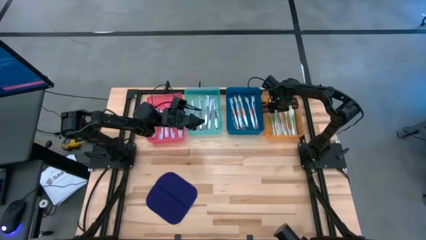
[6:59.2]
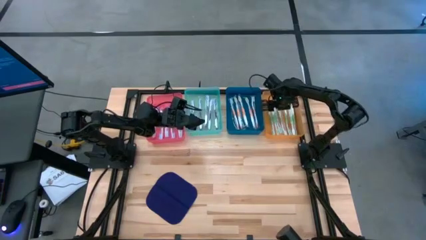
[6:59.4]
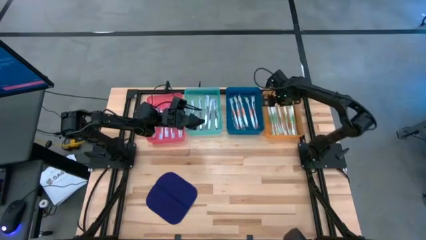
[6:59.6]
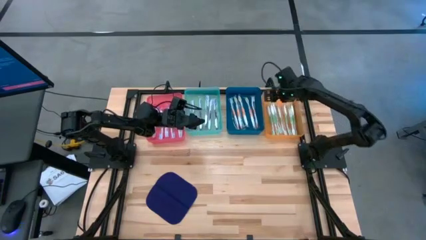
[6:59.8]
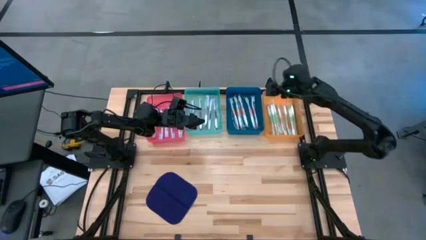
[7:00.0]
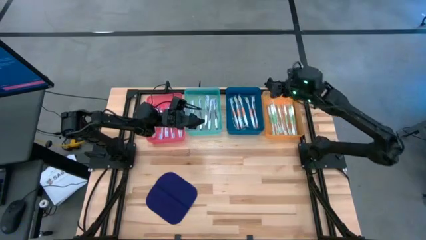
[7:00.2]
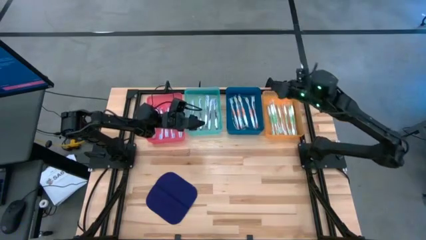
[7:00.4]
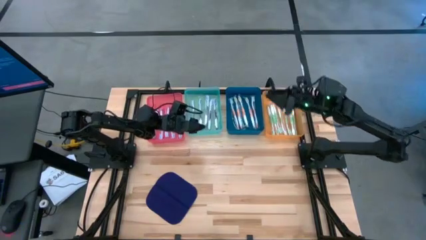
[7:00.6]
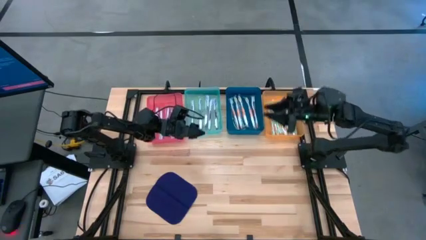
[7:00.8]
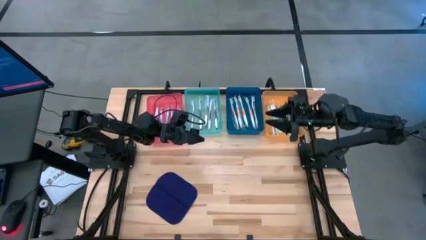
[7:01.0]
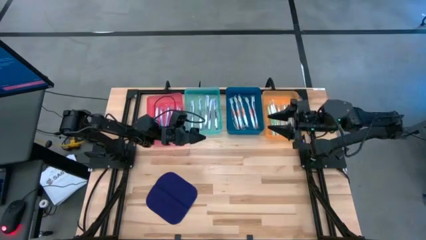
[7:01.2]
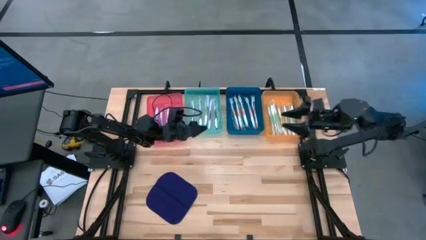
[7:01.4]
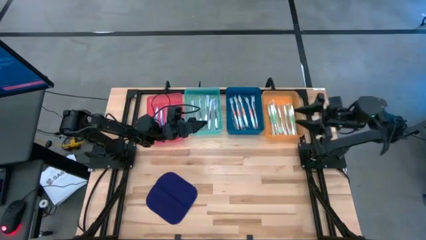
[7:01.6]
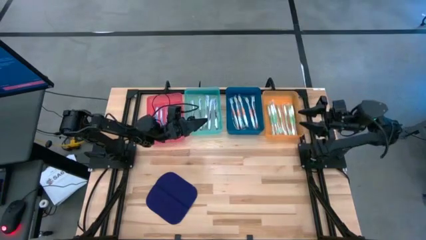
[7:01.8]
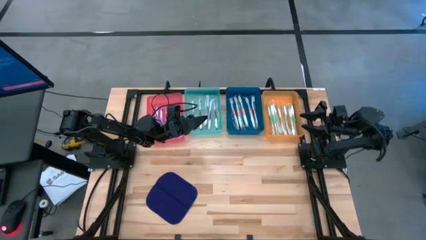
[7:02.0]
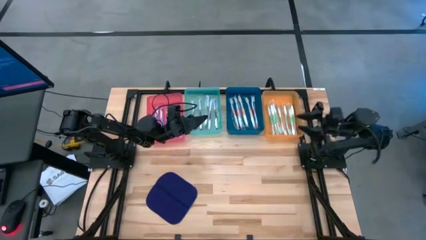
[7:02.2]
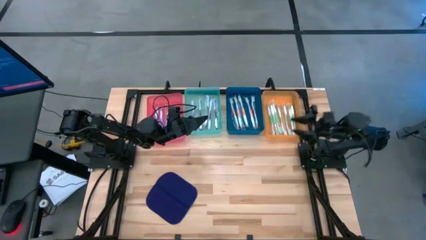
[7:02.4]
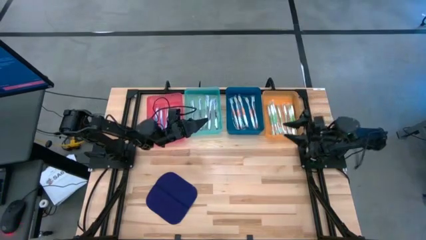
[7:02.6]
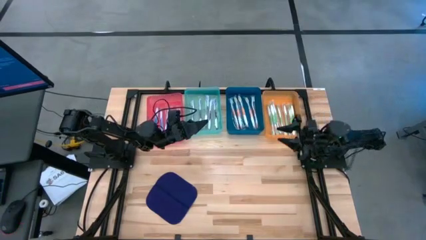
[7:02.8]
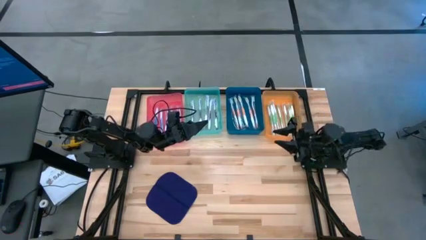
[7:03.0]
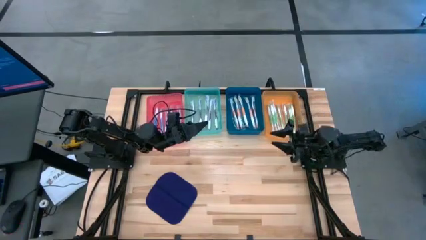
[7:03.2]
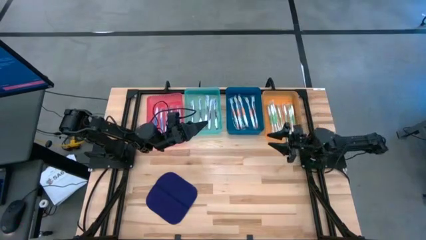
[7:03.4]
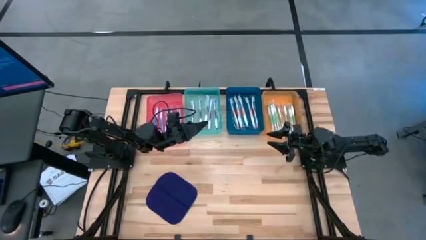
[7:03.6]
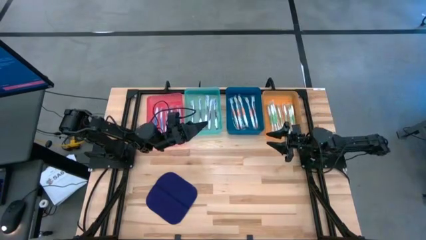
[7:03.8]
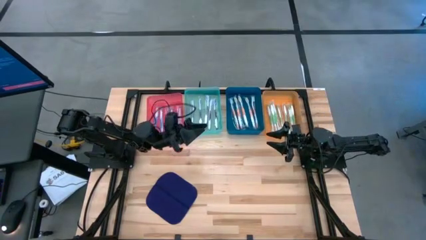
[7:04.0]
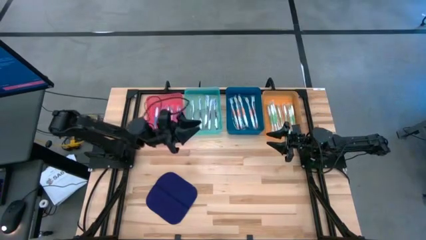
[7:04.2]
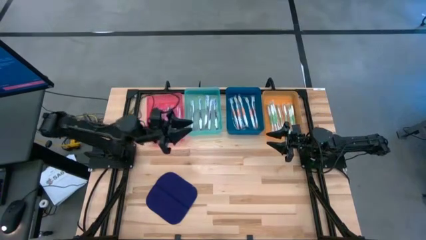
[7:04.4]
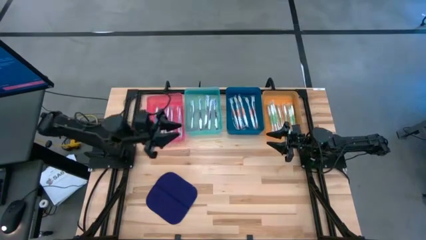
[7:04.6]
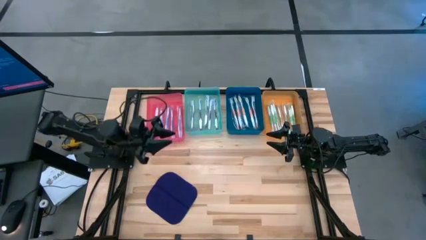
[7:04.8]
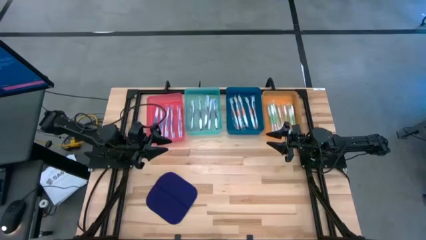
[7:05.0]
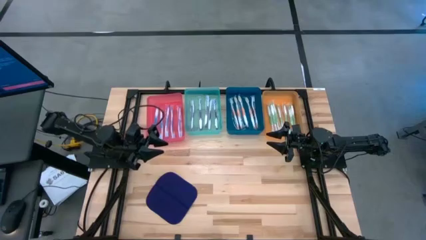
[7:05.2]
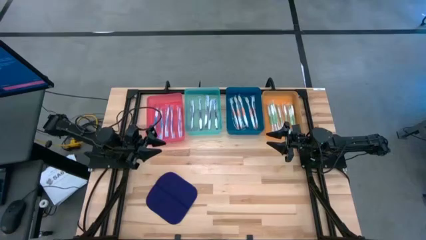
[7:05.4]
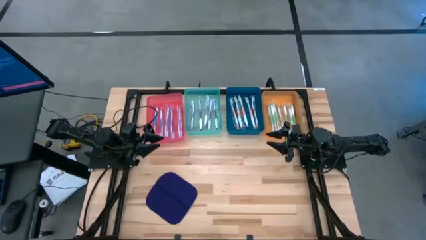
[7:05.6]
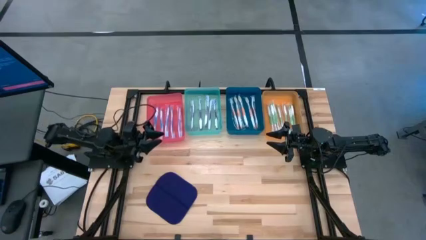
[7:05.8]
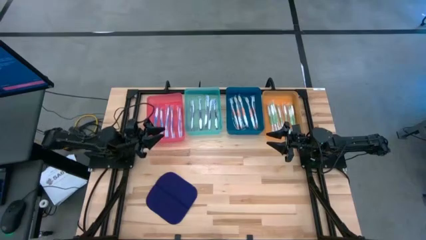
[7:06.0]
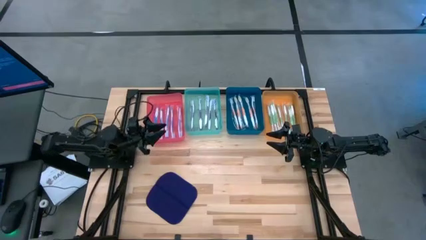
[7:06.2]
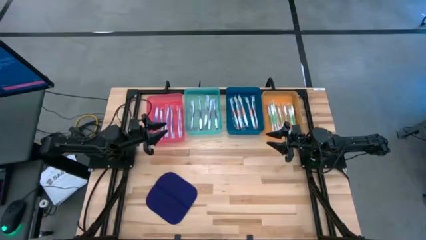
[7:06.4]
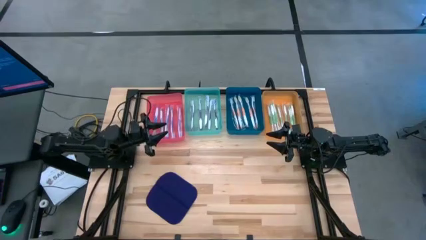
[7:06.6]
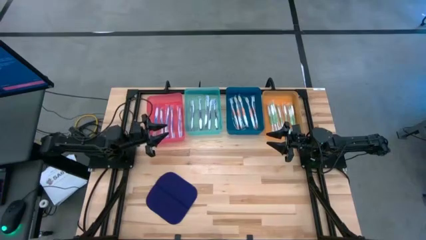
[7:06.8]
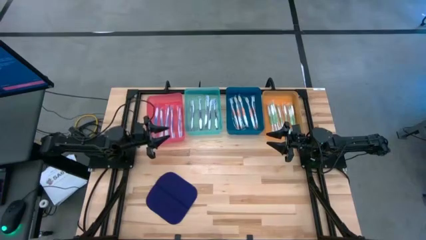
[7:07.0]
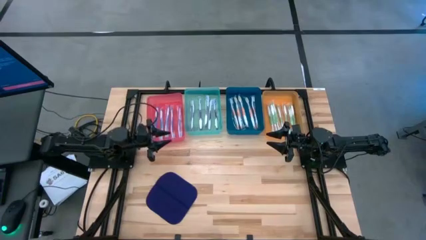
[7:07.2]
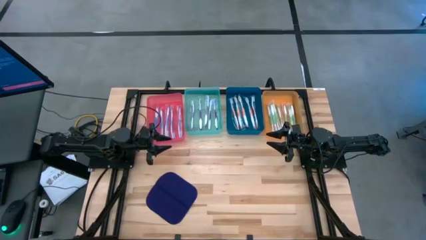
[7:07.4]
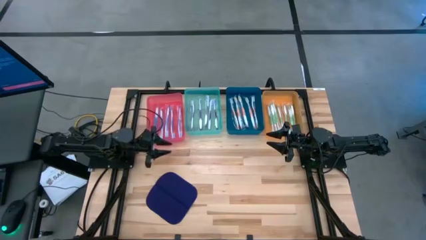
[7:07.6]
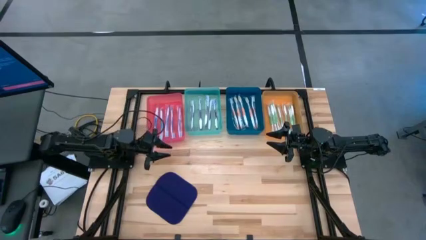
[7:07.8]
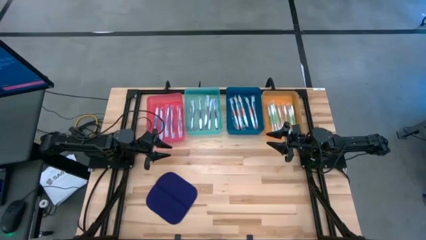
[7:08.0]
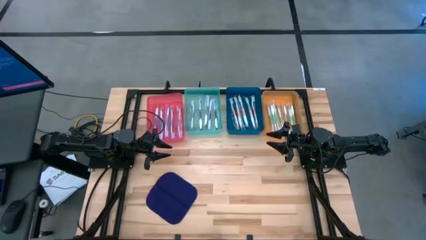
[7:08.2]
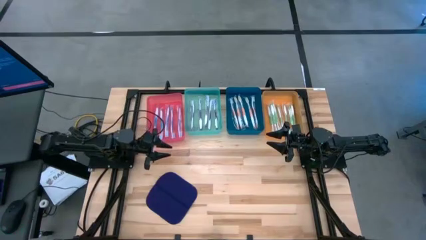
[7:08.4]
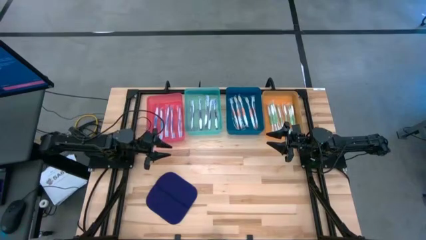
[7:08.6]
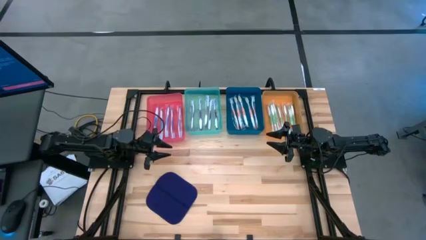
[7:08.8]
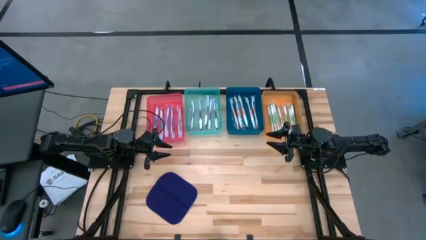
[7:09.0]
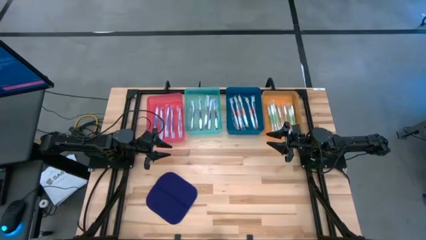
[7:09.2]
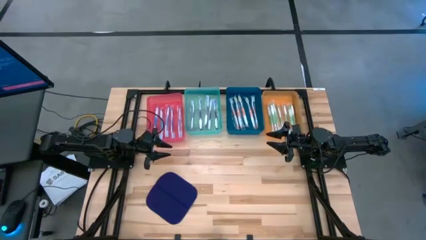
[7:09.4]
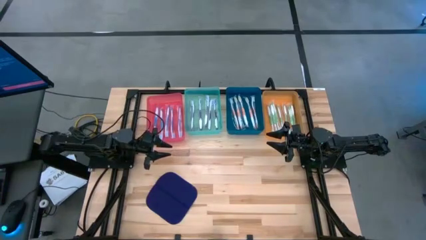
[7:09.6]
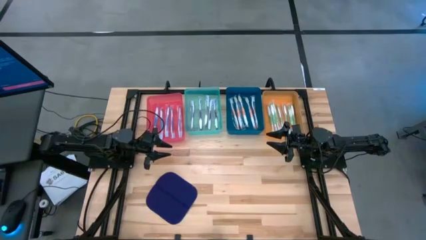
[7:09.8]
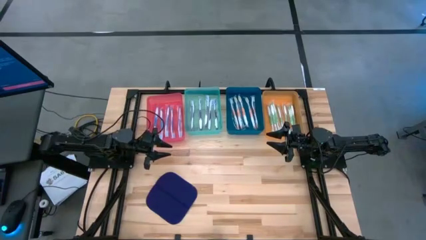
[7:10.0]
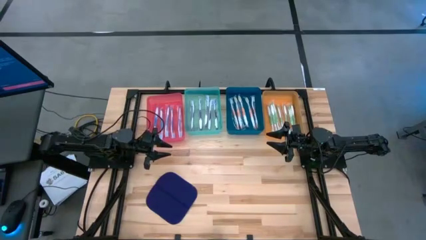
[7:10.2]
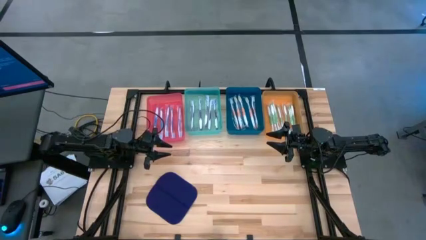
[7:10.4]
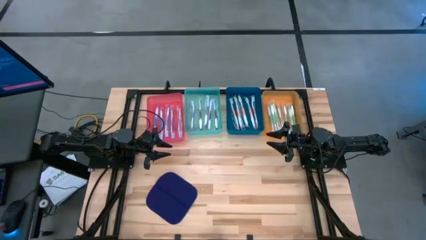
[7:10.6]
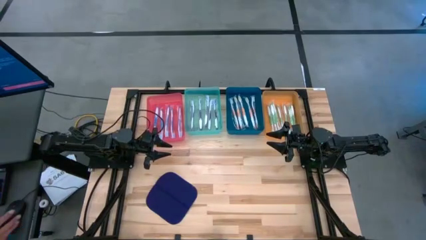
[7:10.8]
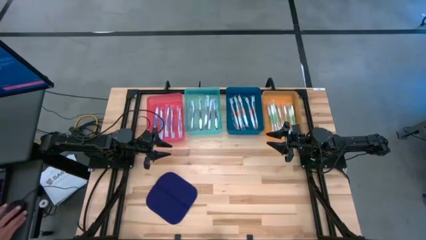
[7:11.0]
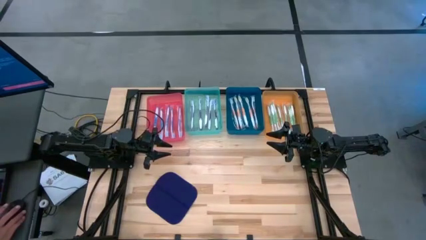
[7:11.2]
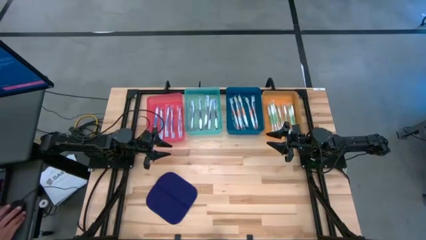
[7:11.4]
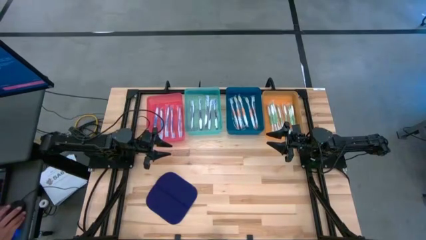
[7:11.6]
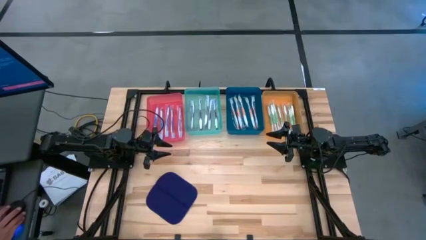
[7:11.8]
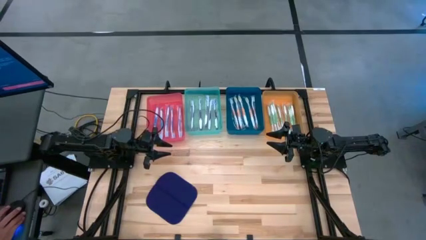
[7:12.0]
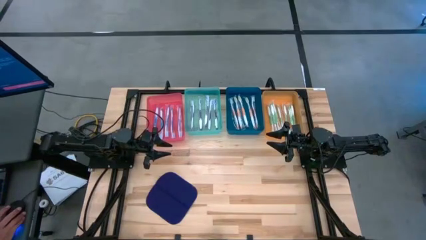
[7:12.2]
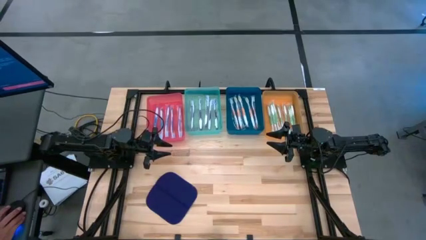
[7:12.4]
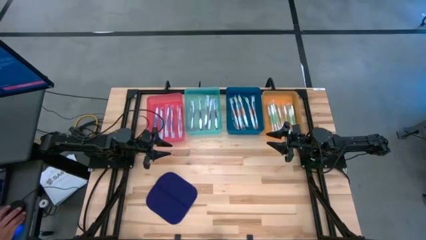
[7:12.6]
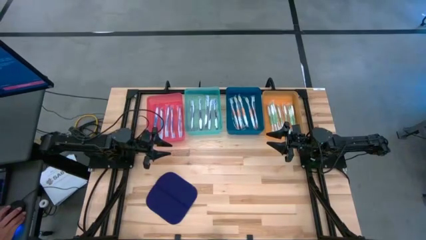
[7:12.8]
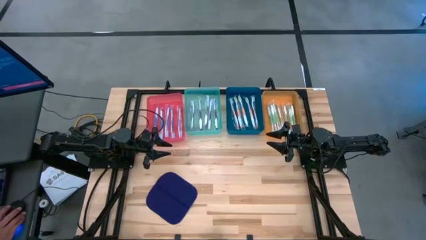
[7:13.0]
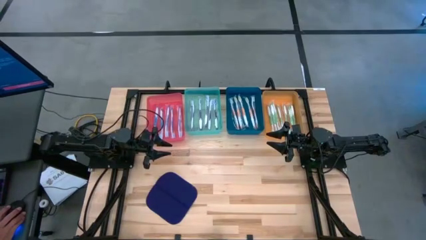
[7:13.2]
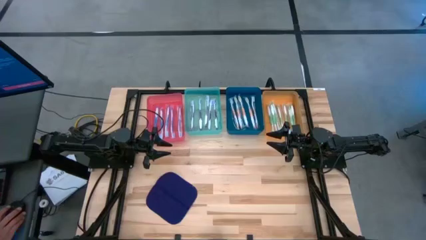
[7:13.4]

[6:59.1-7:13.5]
Task: Pick & Place Toothbrushes
Return to Home Position

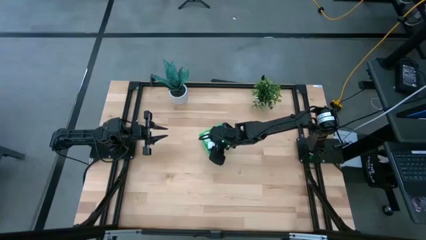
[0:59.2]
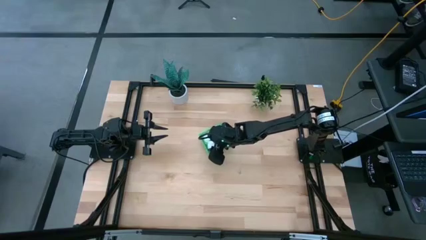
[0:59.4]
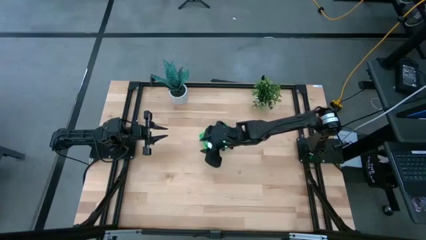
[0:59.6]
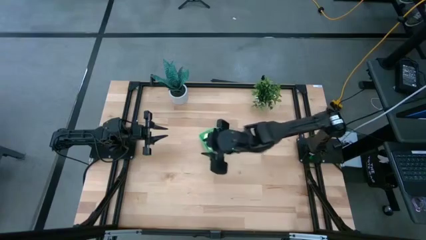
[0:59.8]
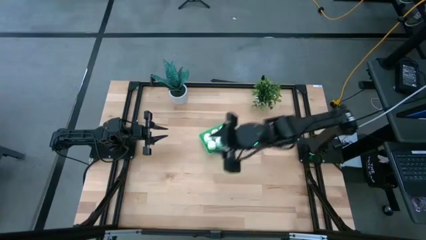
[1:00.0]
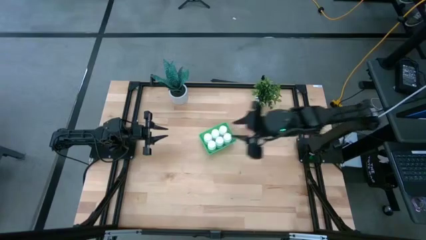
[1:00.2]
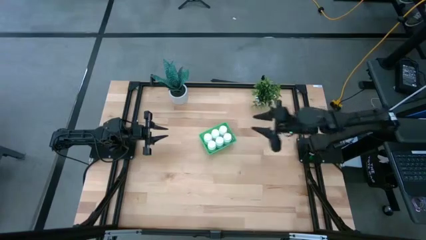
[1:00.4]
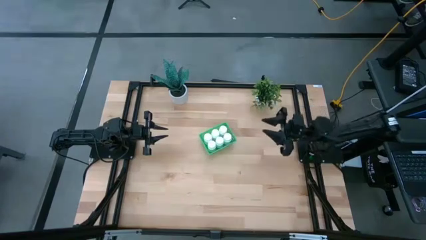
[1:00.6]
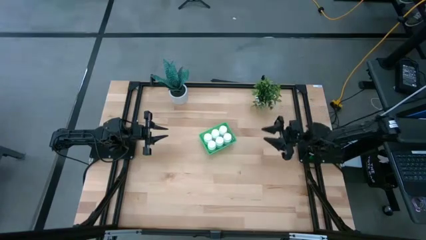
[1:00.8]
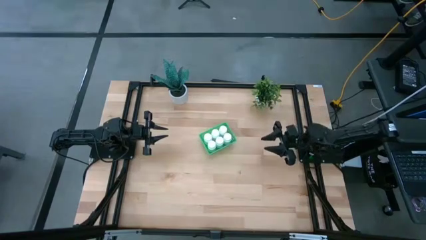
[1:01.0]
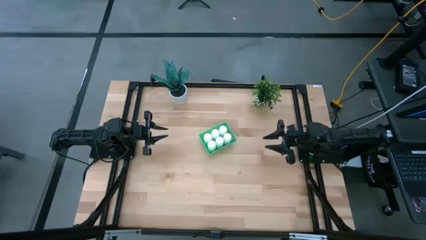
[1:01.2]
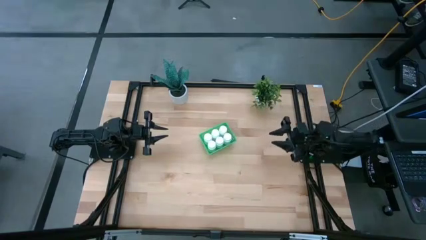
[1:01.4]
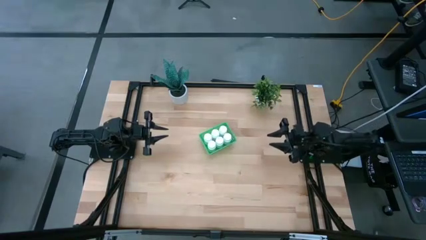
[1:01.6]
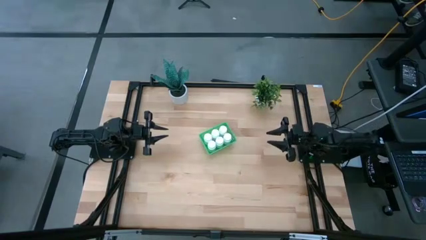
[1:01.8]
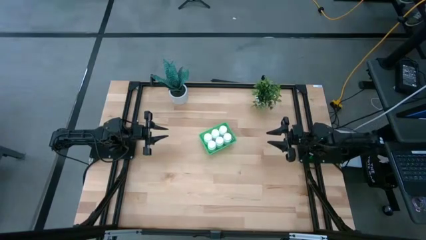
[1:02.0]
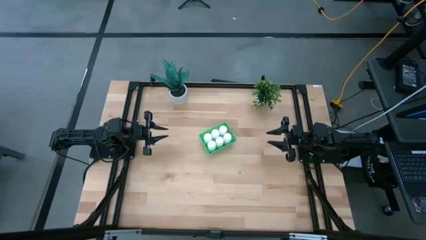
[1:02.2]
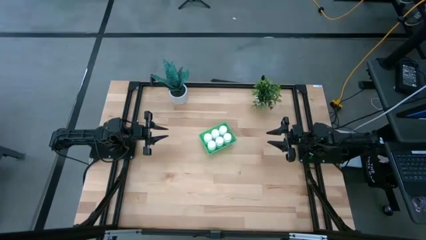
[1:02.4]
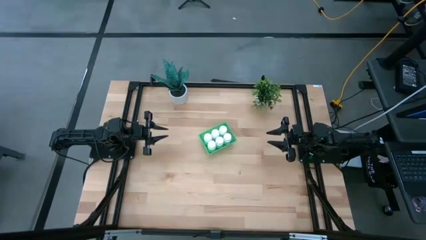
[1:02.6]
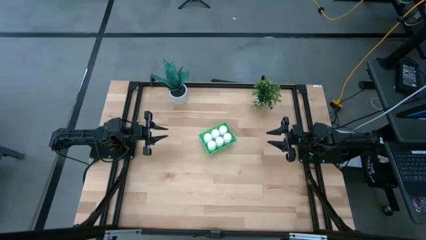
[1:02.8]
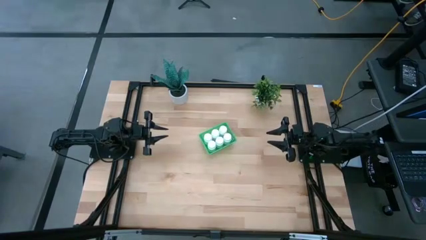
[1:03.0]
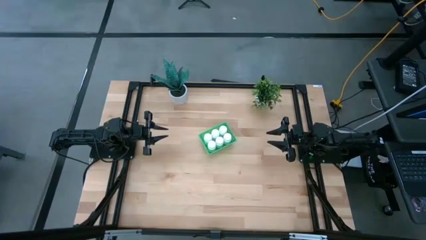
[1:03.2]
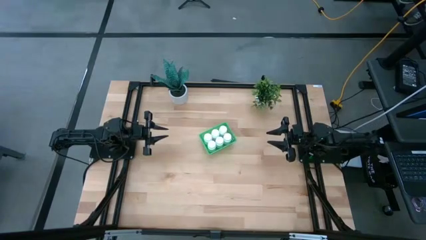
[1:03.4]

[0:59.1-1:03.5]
Task: Pick and place pill bottles into a basket
Return to Home Position
